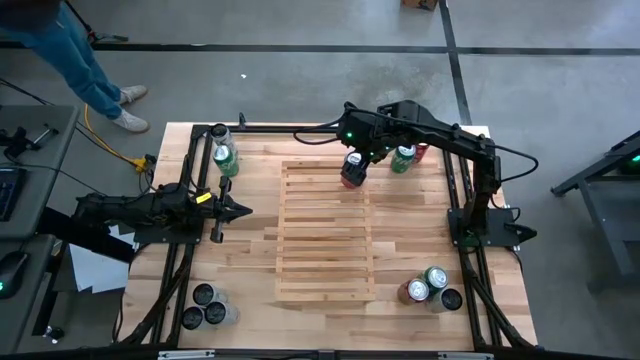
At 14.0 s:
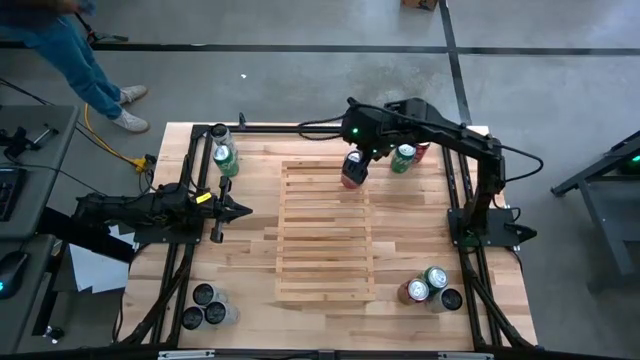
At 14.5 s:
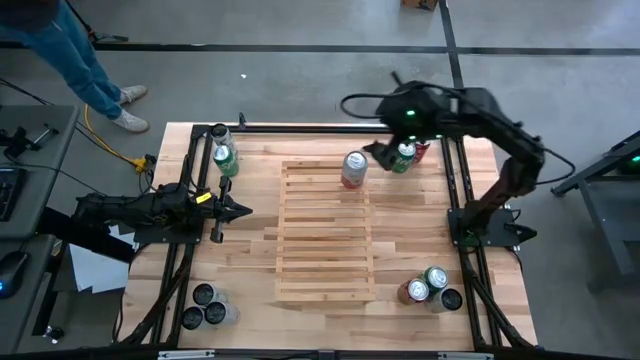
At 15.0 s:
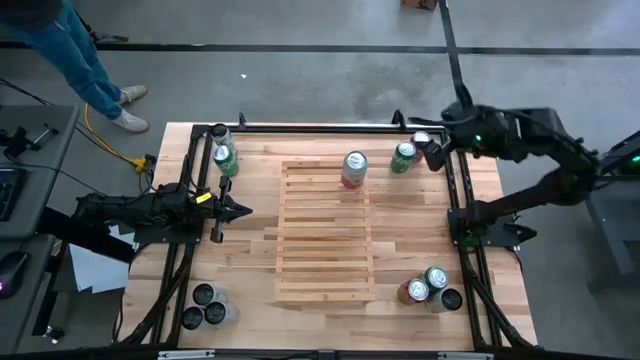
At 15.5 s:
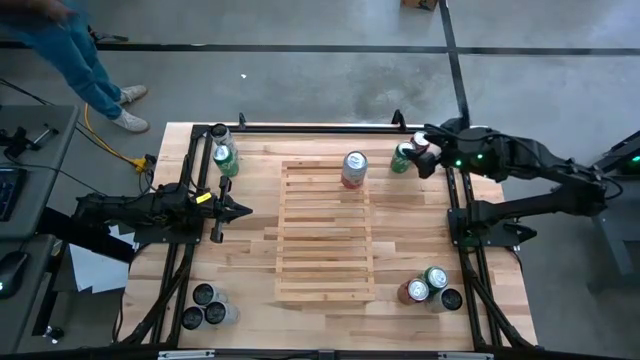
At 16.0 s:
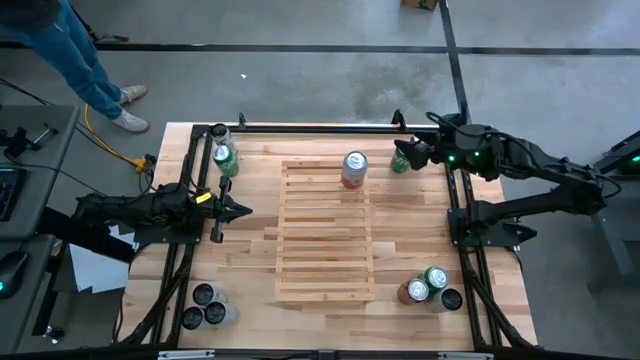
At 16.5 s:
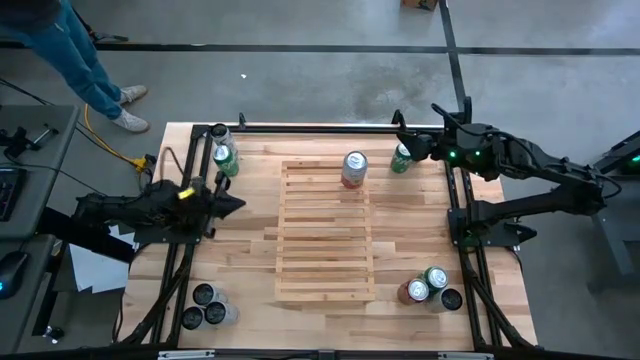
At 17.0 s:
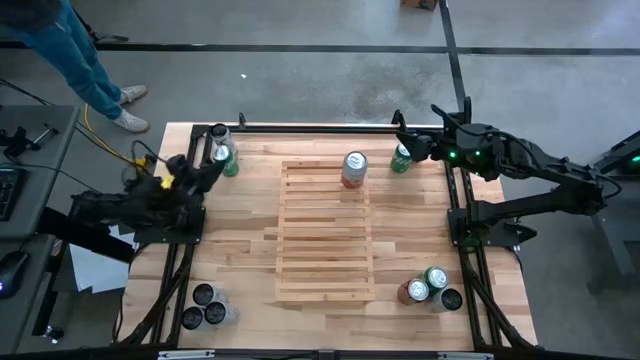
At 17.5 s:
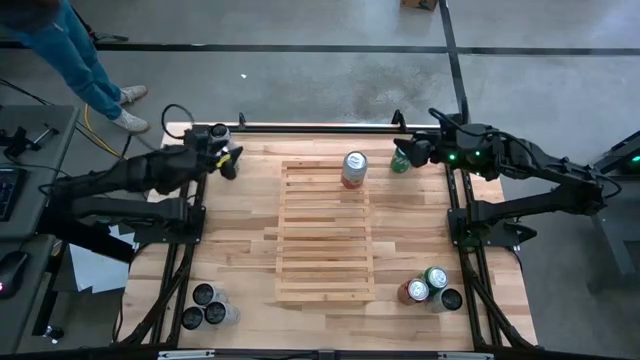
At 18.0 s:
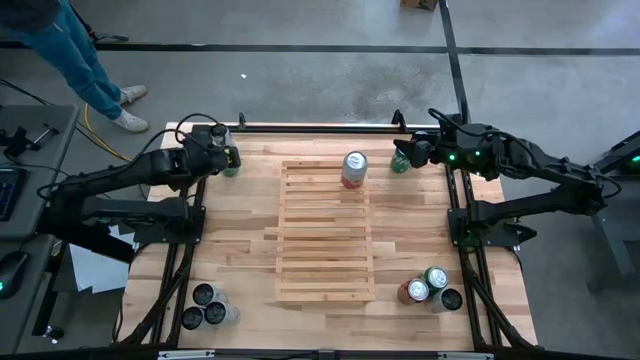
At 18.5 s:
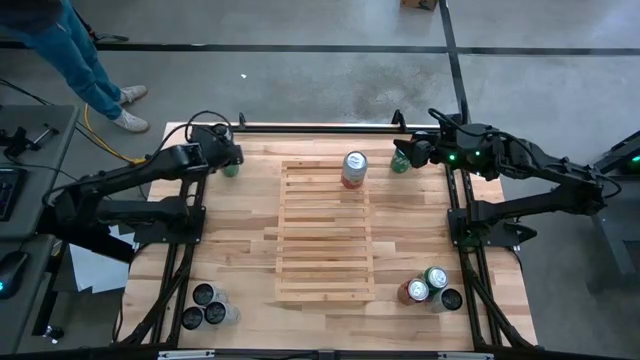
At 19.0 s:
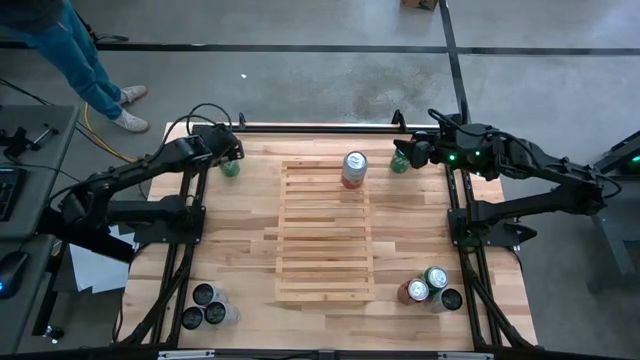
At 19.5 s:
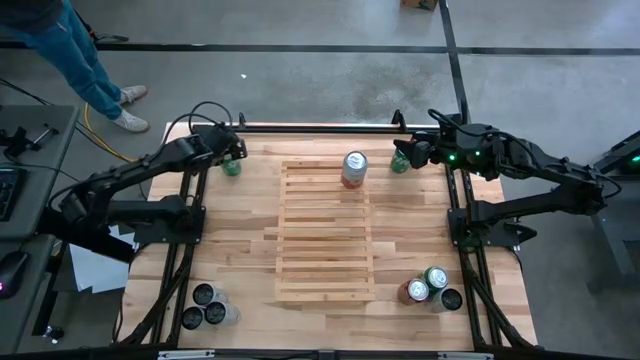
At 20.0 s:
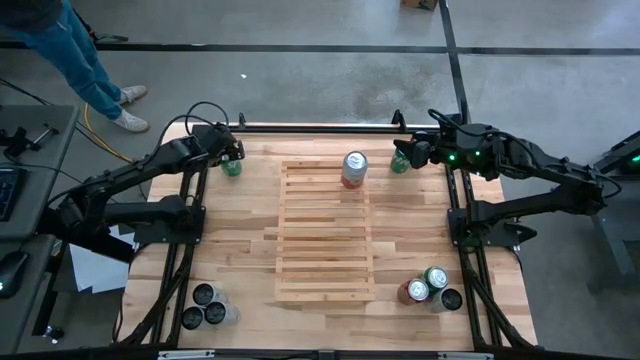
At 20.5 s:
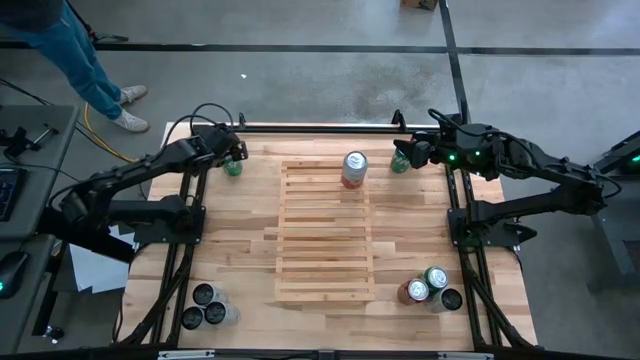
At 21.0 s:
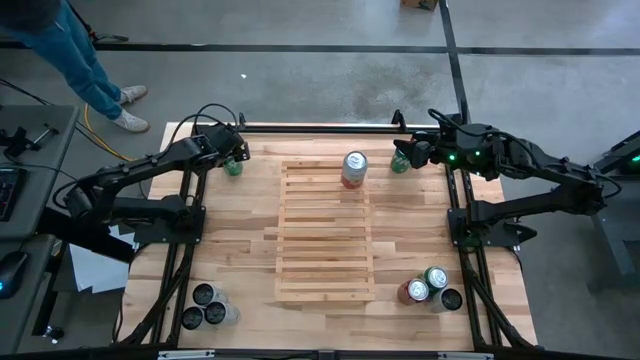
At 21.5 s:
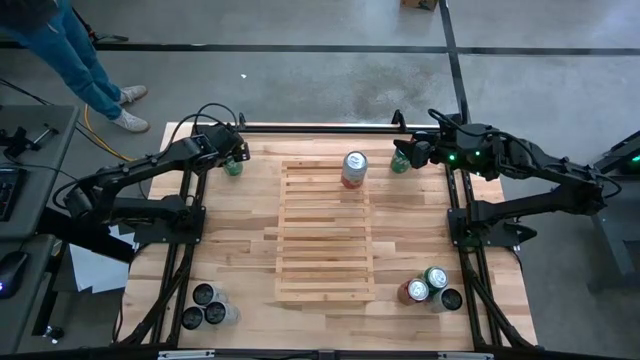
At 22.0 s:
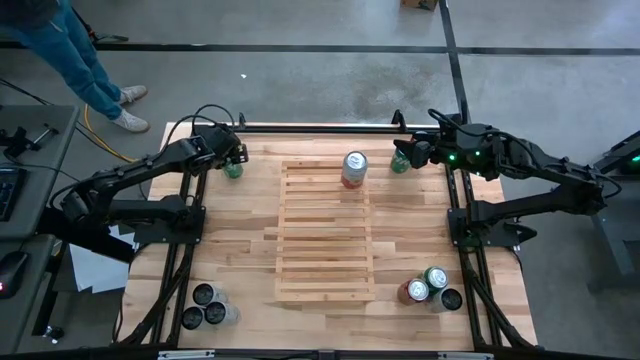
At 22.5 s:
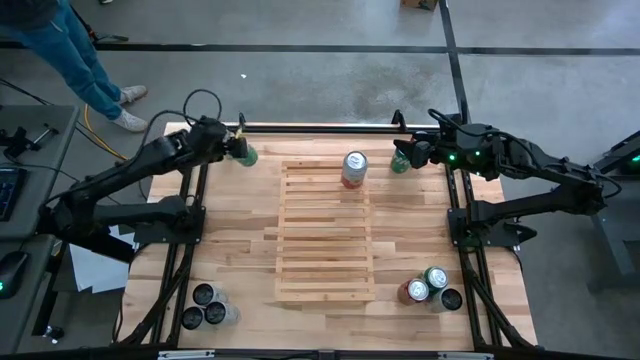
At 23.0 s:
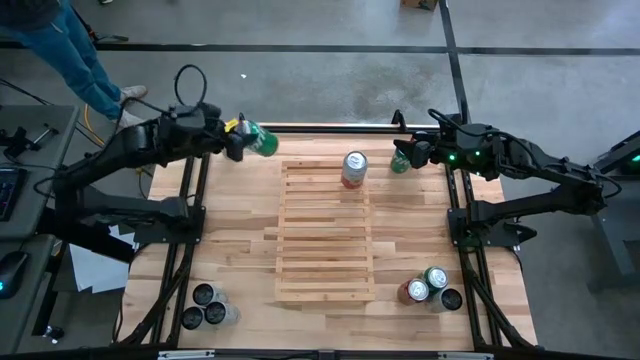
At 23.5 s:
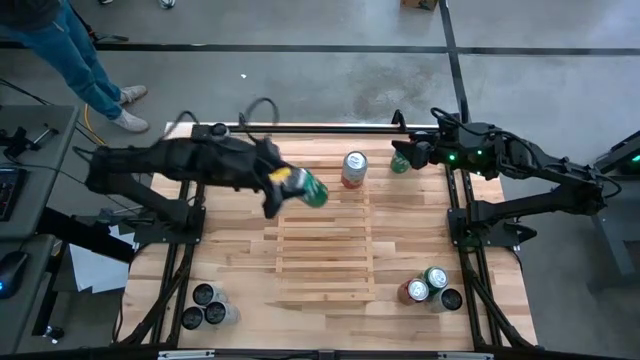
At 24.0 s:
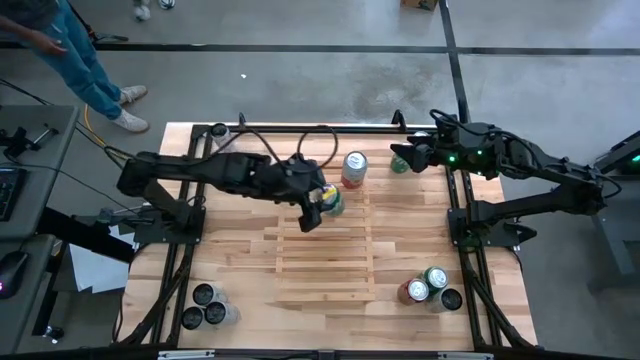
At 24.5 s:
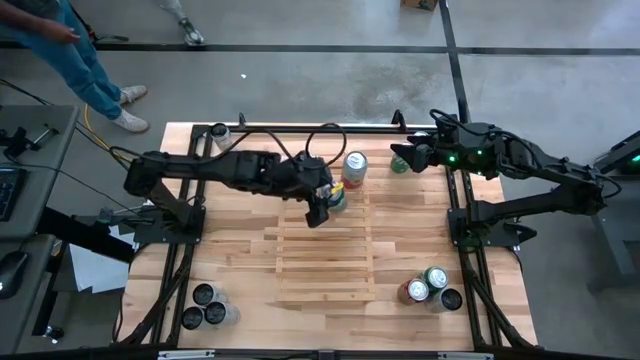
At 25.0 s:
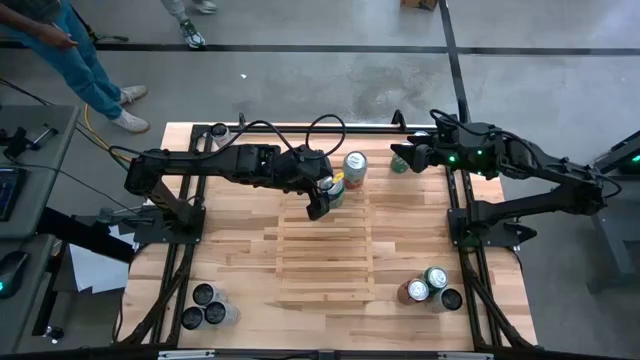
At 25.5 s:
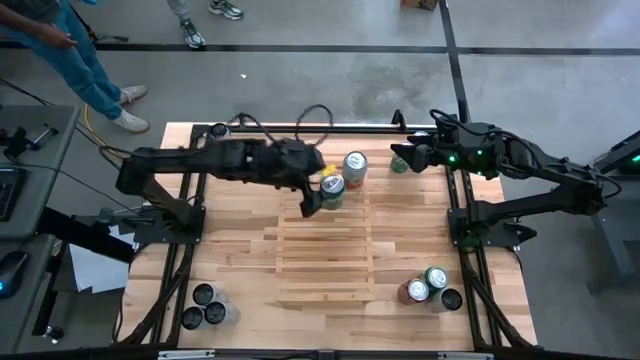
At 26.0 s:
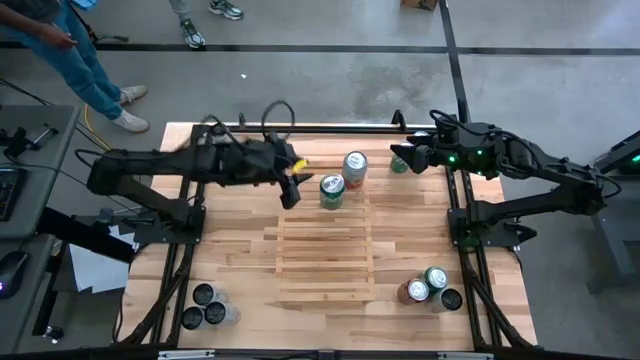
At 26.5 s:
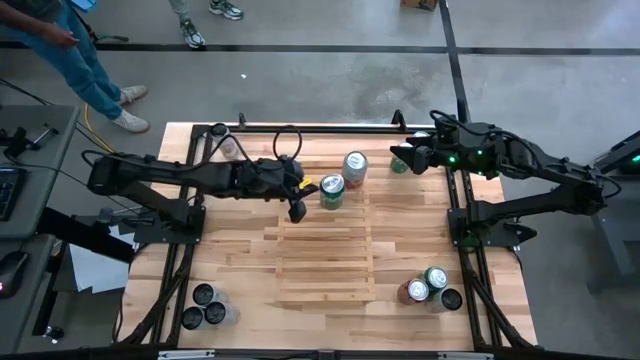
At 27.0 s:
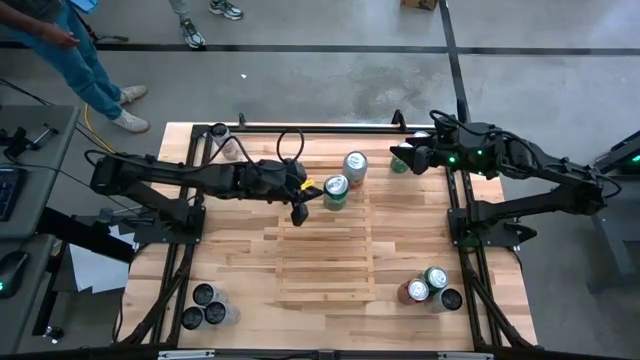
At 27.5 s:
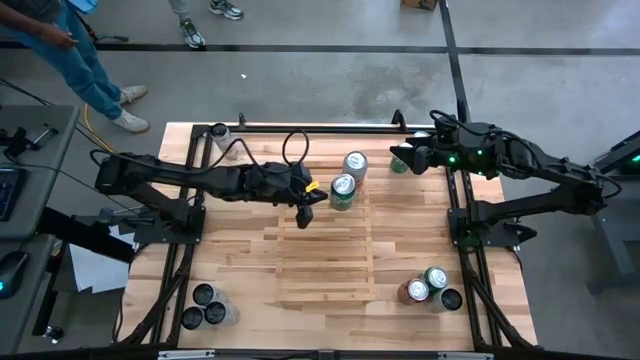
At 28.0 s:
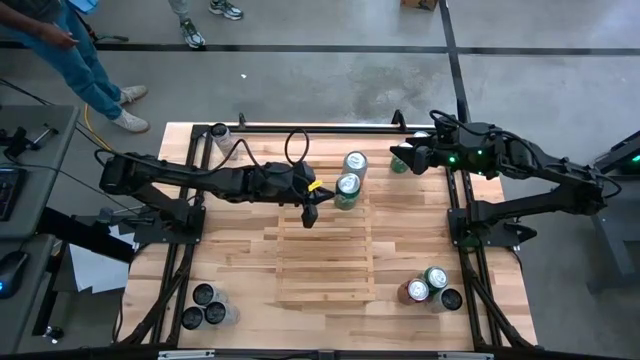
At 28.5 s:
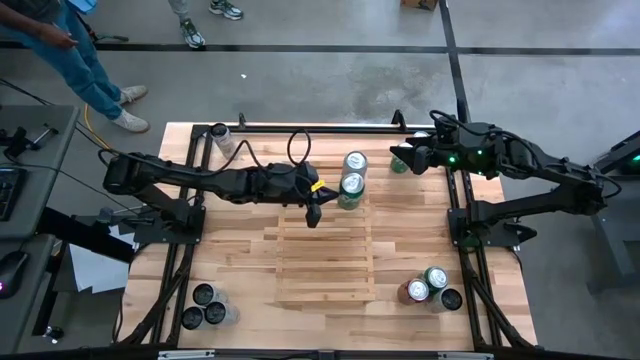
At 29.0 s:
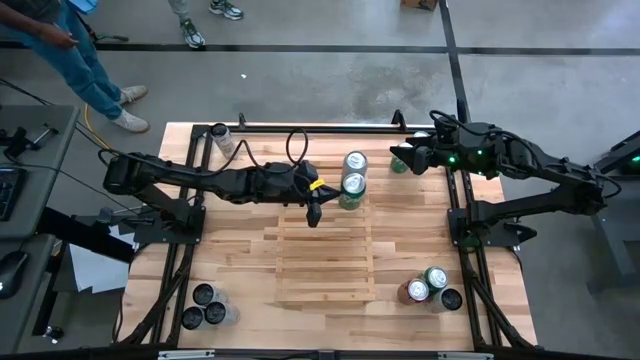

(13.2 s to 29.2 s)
Task: Place canned beverage on shelf
Put the top left green soda can on the shelf

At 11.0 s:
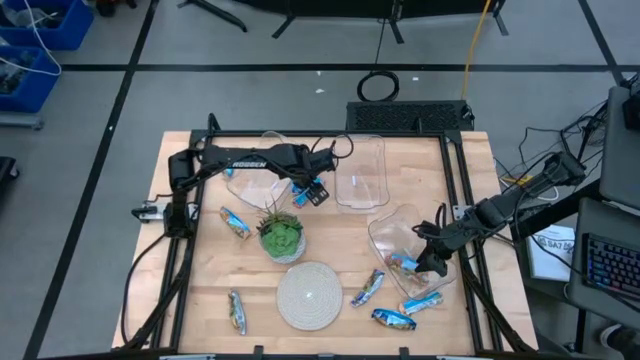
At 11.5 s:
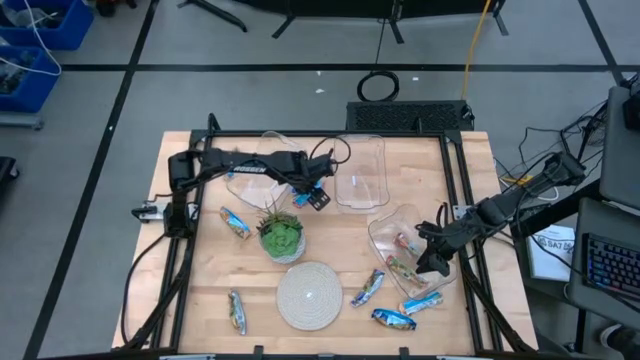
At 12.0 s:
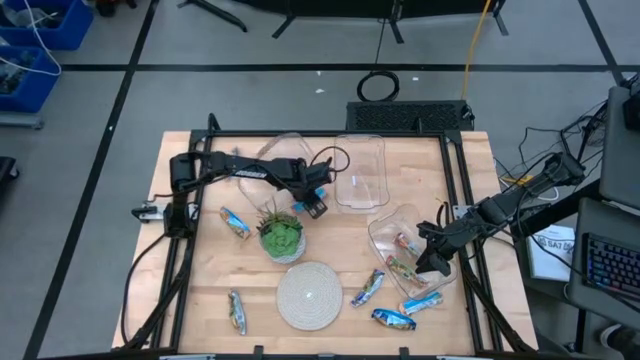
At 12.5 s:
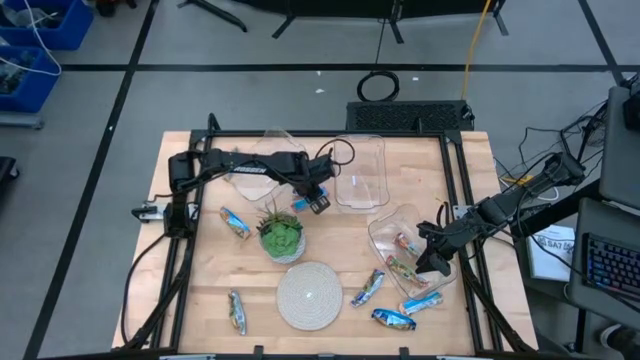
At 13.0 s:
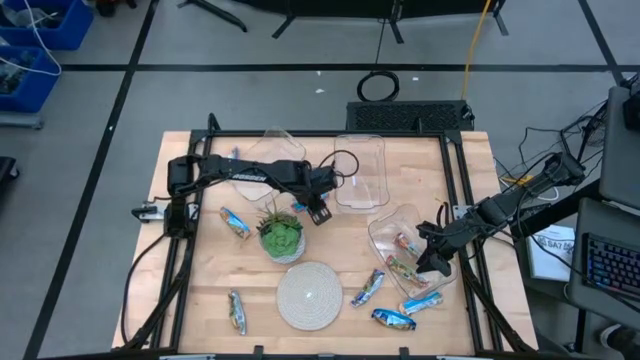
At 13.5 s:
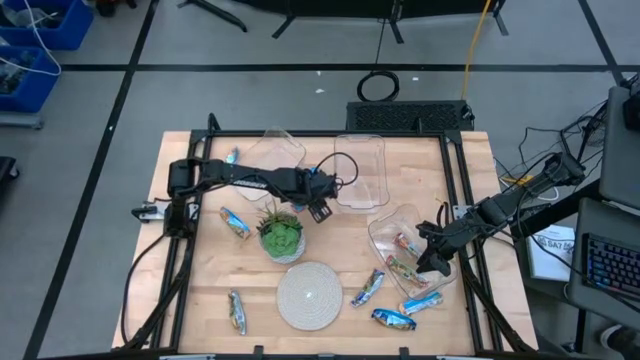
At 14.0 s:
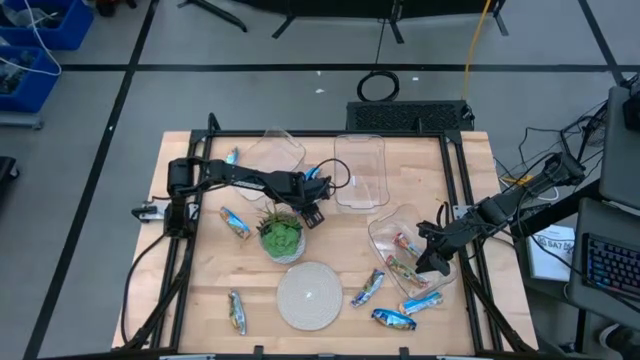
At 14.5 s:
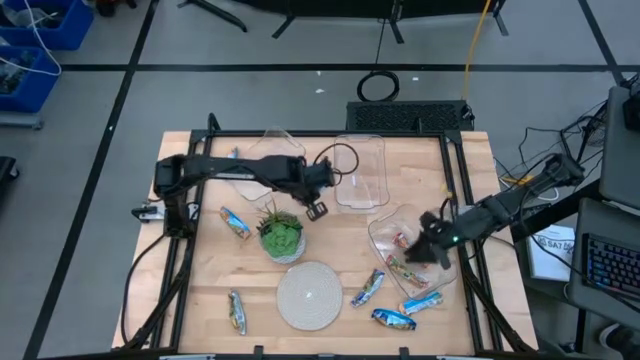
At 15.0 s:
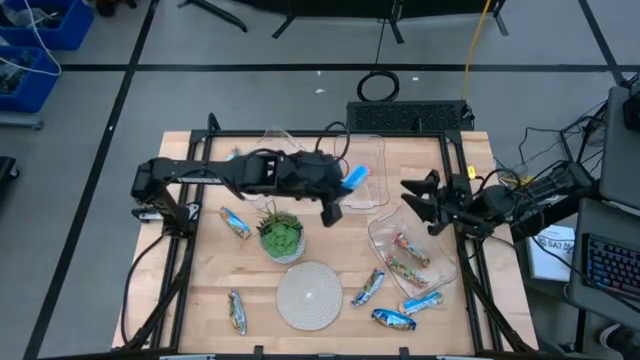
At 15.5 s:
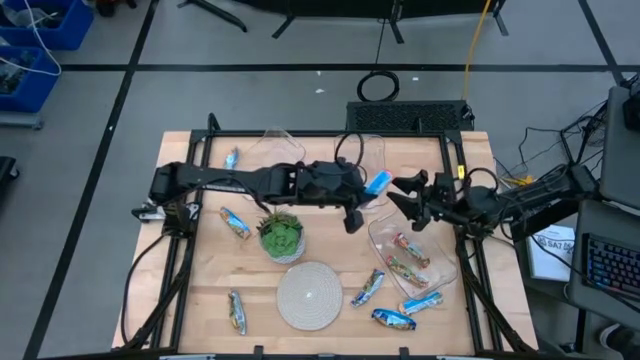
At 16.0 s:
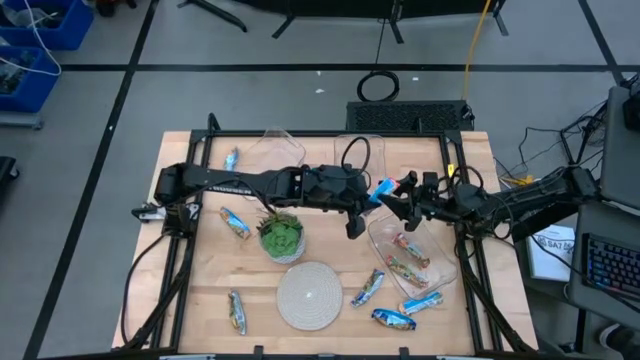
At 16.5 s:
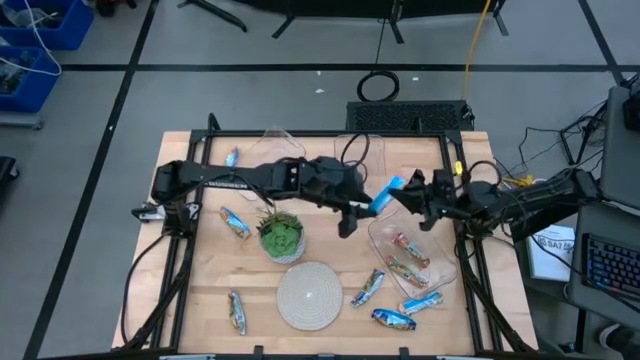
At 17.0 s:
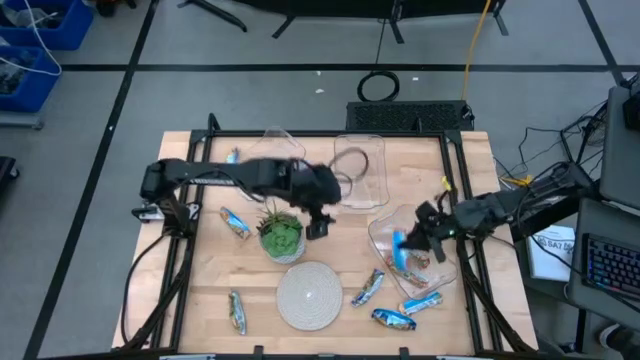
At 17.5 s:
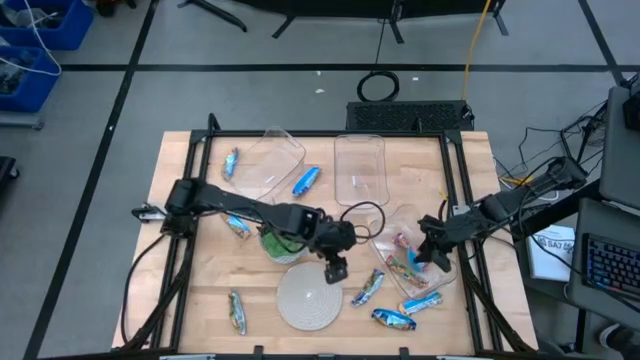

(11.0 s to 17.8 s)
Task: Pick and place Granola Bars by type
Put the red granola bar into the bottom right transparent bin
